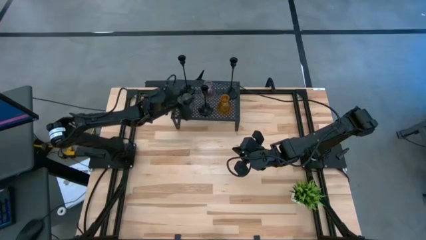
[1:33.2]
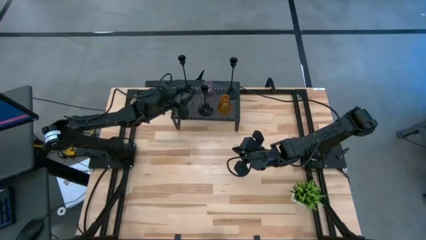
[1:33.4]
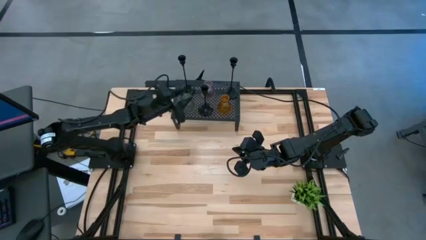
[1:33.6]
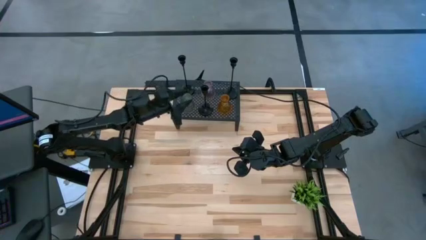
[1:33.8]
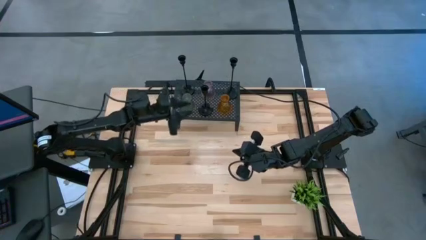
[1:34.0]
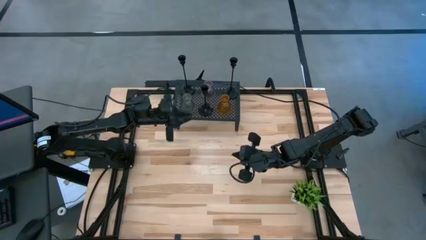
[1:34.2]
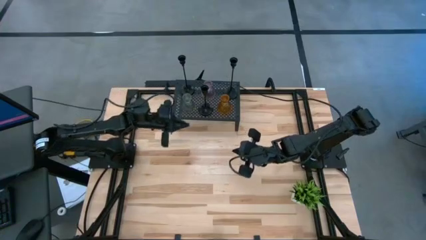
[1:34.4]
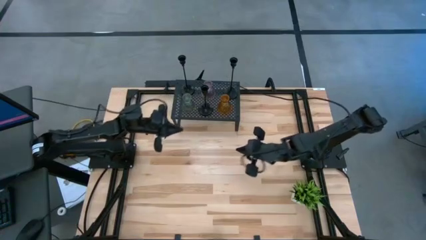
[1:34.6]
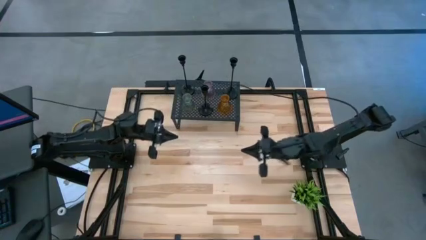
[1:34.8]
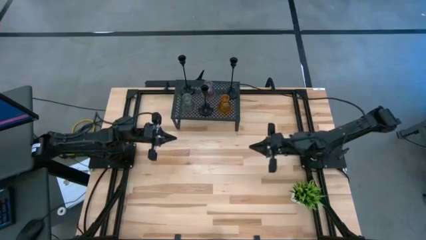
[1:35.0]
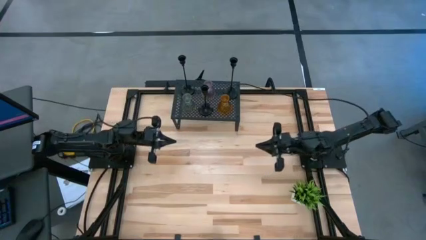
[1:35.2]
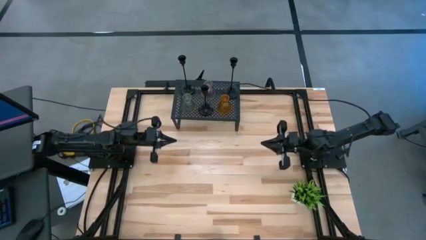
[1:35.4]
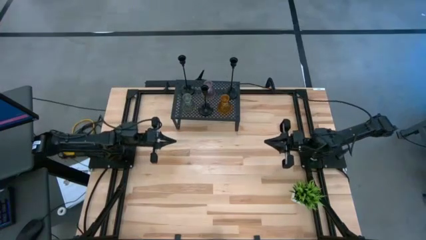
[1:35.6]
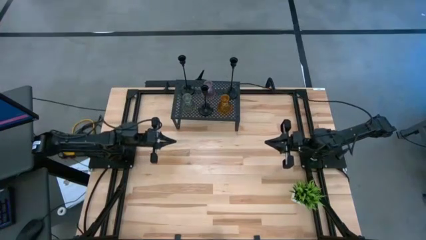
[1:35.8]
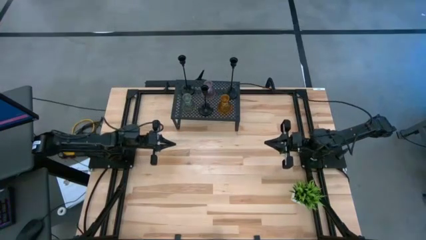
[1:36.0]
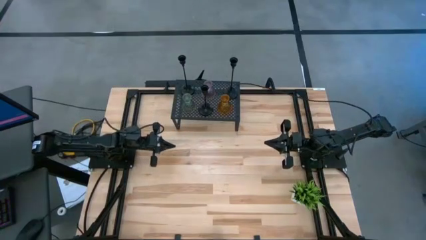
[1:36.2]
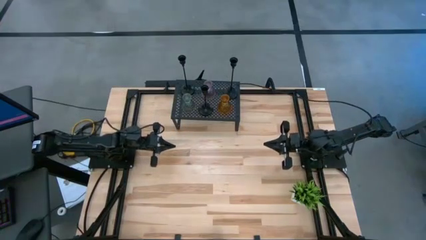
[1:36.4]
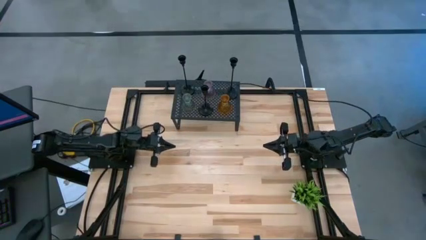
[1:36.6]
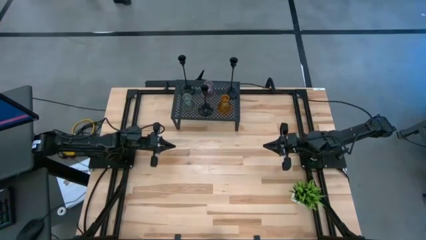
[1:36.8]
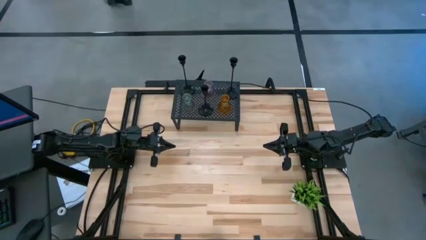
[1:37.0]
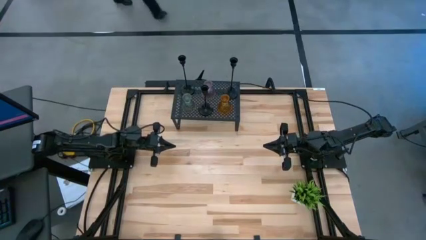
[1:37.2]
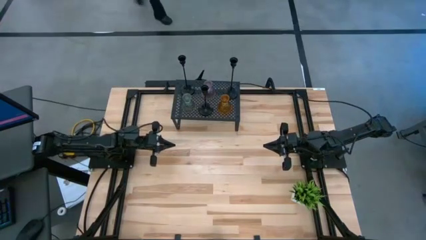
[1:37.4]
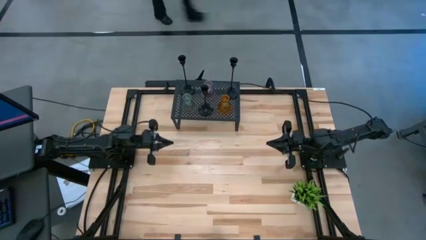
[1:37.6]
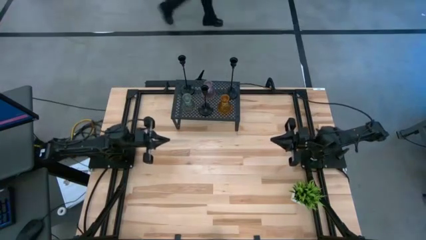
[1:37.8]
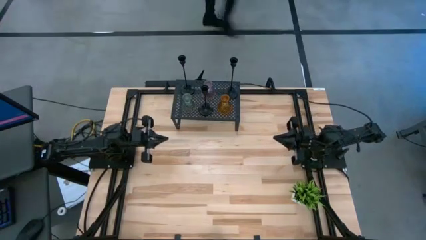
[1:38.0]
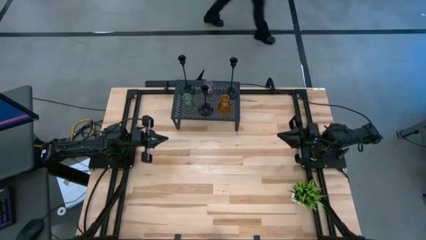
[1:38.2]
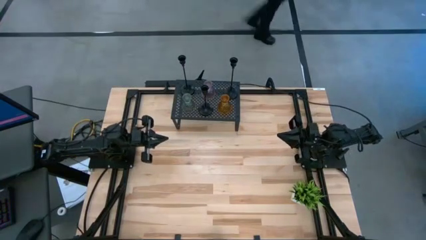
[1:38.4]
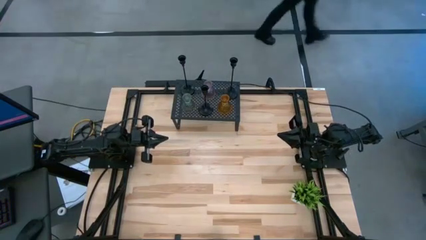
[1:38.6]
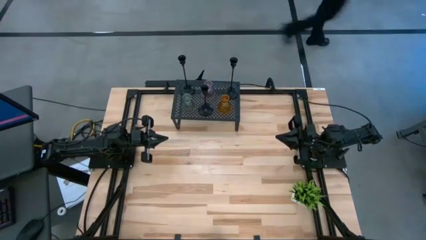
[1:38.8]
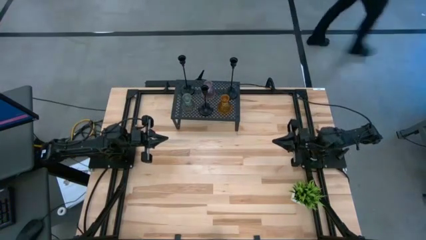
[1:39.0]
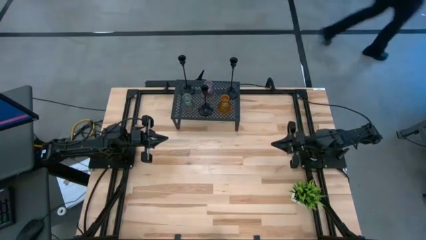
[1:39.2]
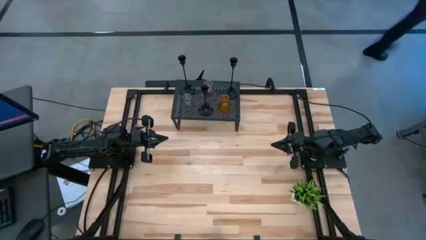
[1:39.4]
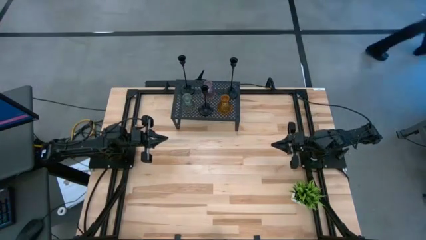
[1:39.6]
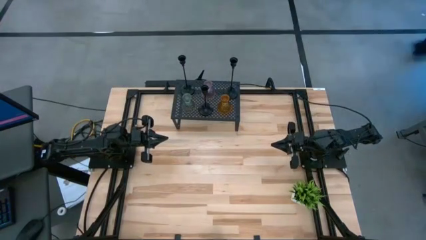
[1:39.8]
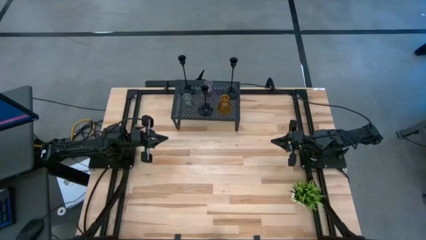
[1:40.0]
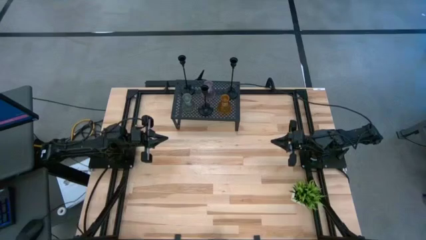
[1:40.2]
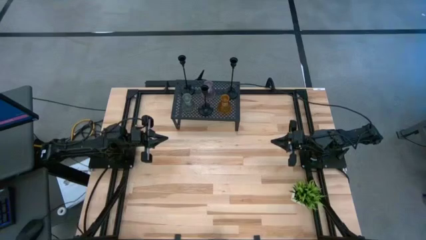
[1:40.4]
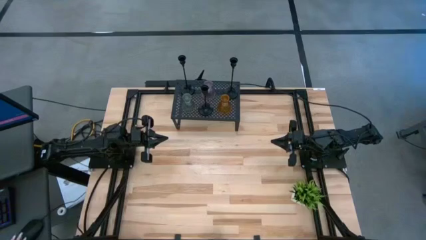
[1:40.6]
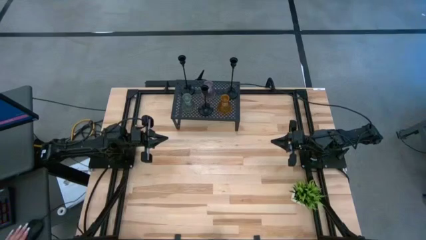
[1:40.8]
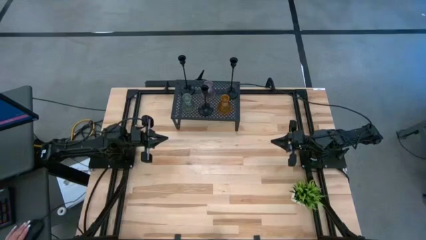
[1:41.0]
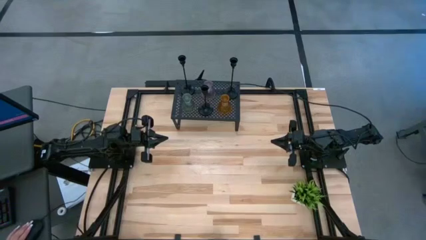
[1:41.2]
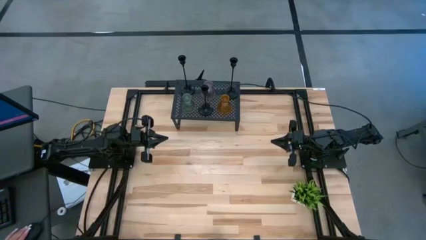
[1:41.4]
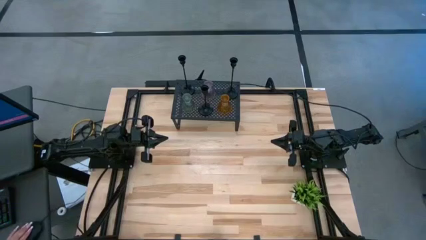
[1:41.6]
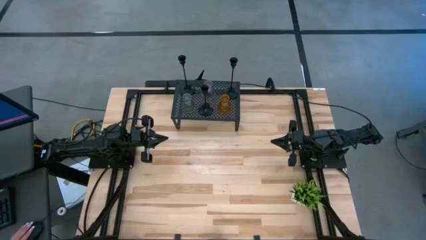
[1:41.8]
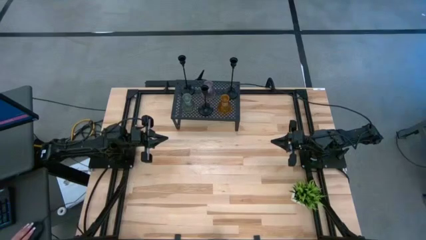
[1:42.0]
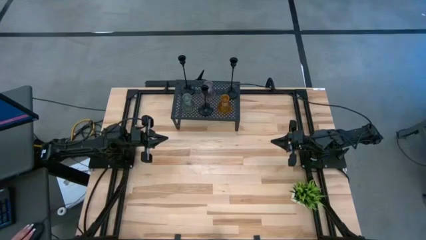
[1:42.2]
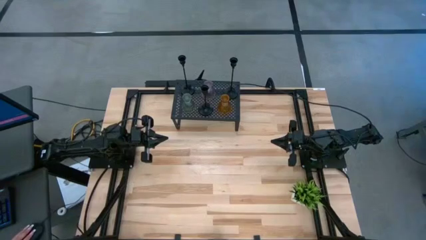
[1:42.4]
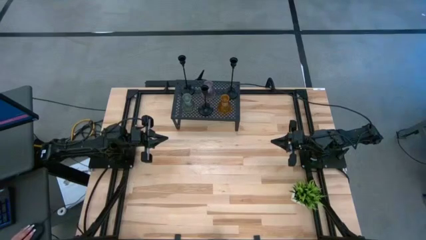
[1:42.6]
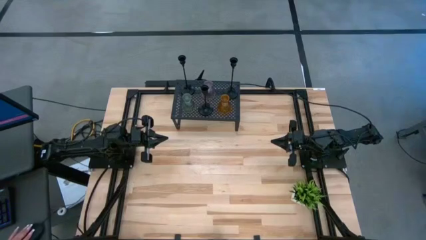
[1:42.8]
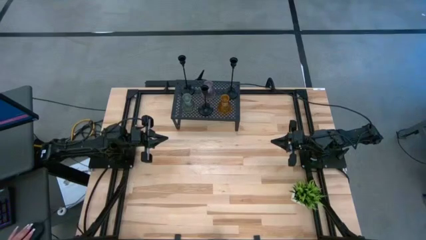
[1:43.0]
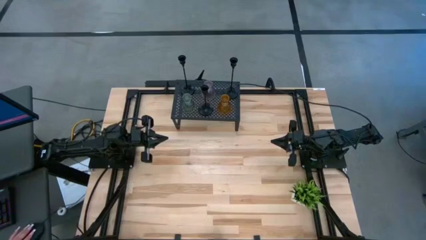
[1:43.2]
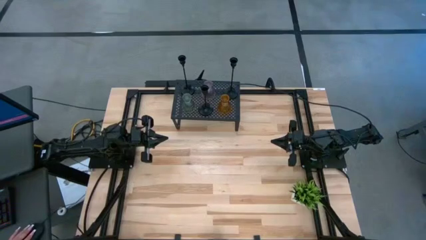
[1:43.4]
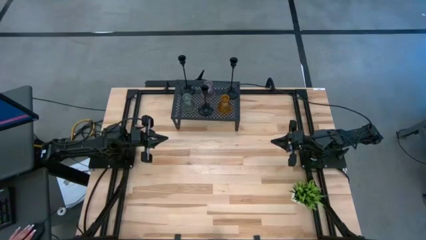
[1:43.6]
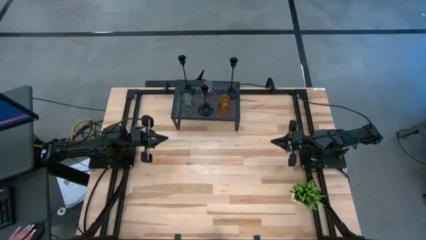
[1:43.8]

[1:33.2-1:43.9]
Task: Pick & Place candle stick holders
Return to Home Position
